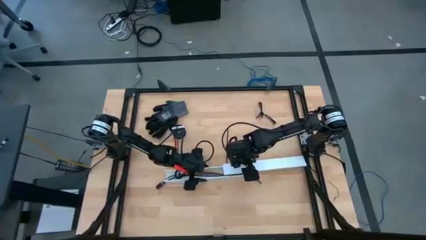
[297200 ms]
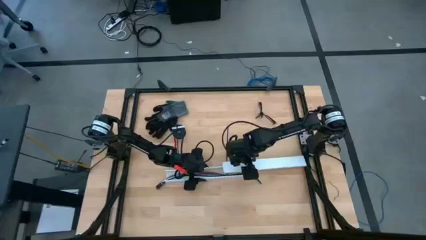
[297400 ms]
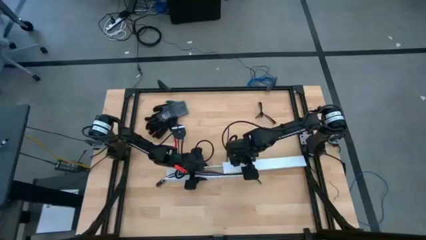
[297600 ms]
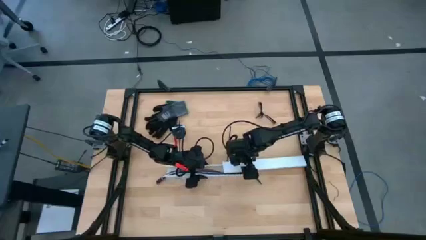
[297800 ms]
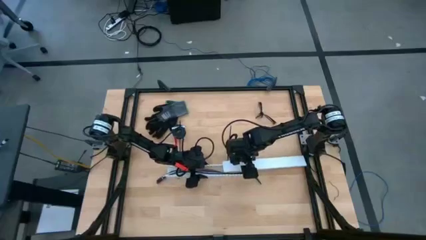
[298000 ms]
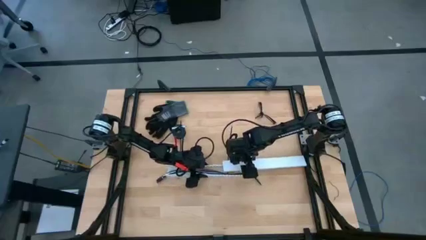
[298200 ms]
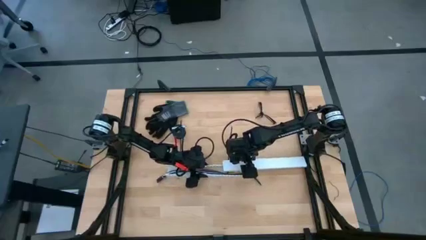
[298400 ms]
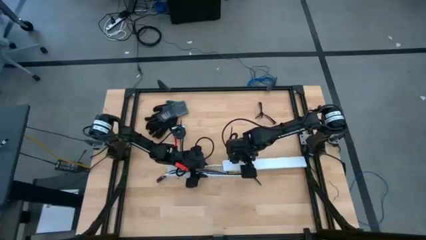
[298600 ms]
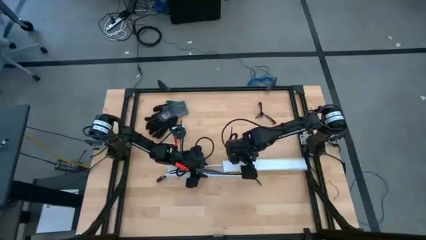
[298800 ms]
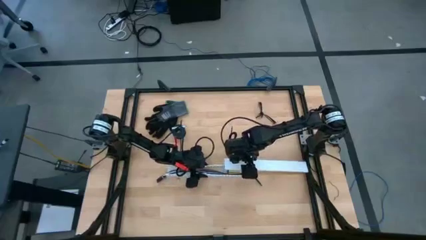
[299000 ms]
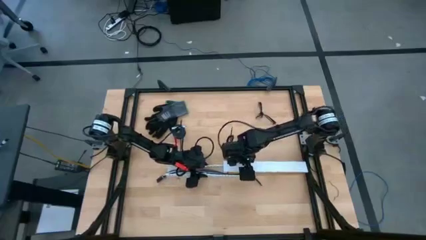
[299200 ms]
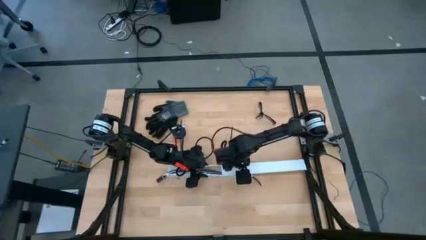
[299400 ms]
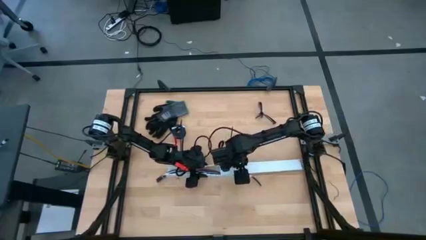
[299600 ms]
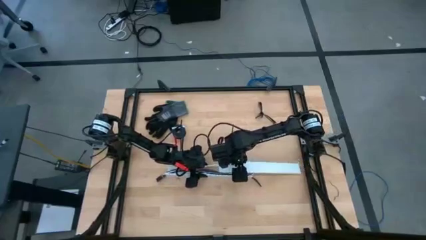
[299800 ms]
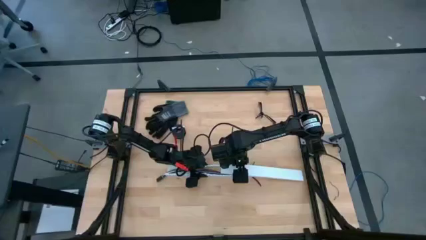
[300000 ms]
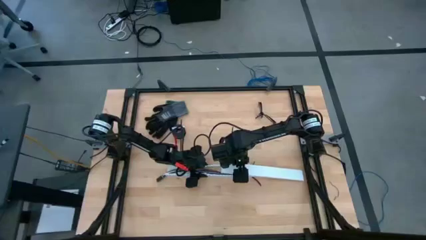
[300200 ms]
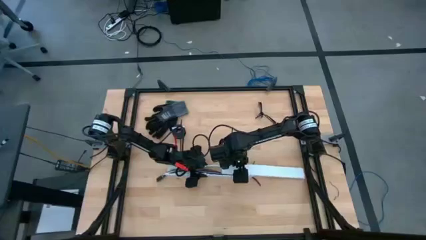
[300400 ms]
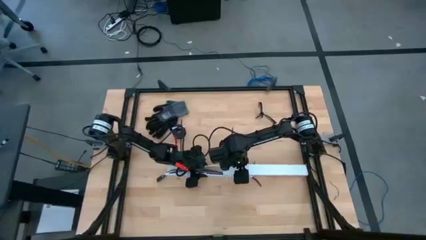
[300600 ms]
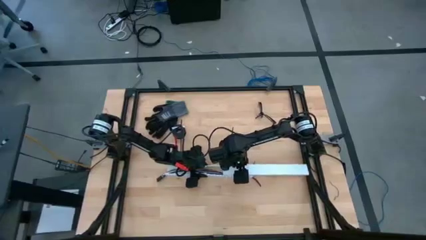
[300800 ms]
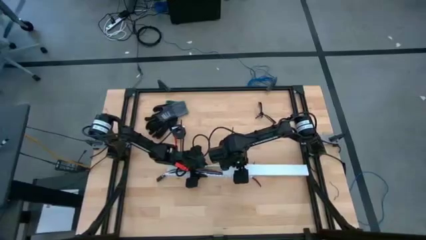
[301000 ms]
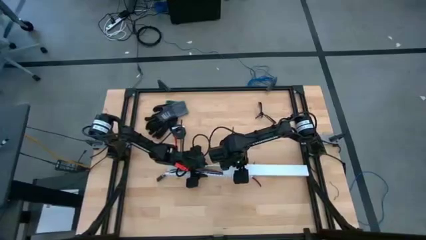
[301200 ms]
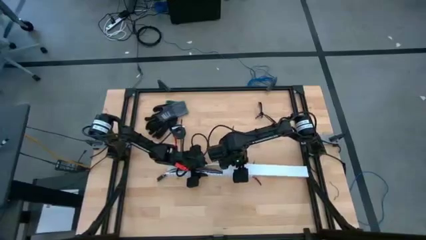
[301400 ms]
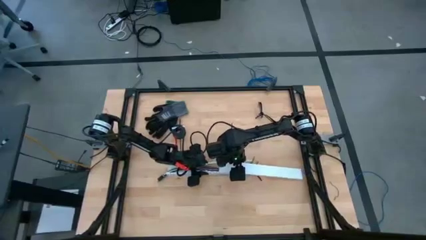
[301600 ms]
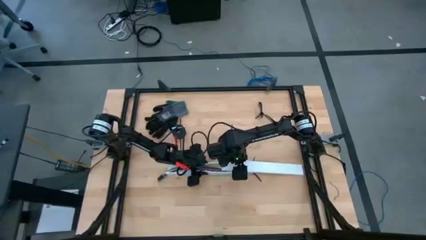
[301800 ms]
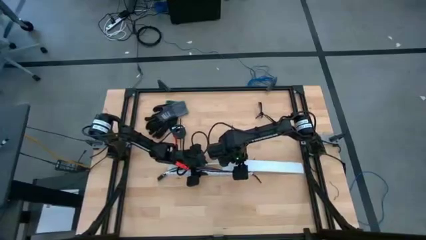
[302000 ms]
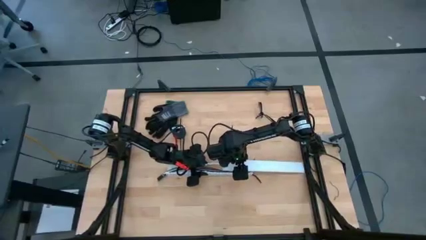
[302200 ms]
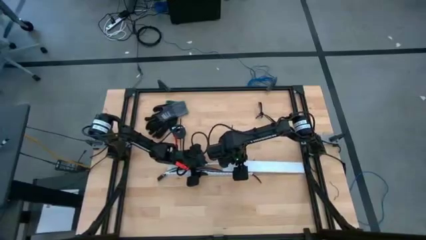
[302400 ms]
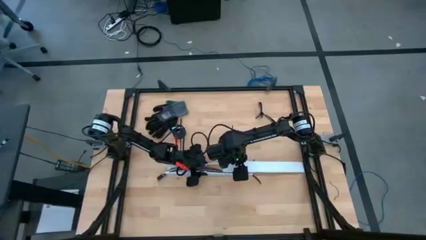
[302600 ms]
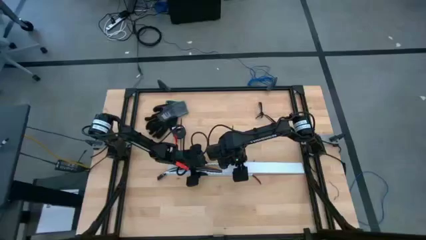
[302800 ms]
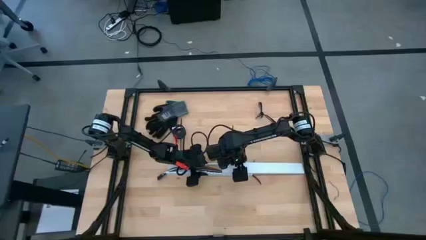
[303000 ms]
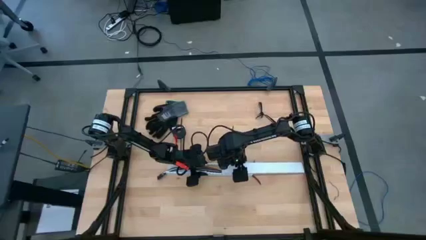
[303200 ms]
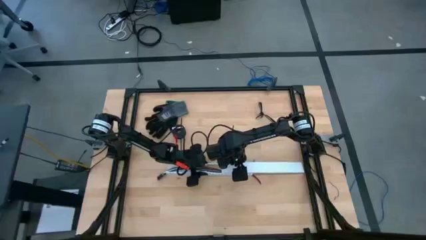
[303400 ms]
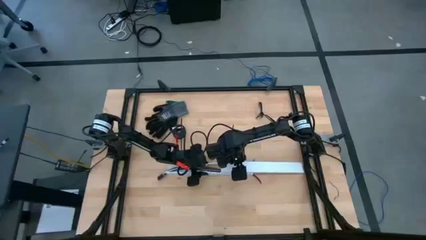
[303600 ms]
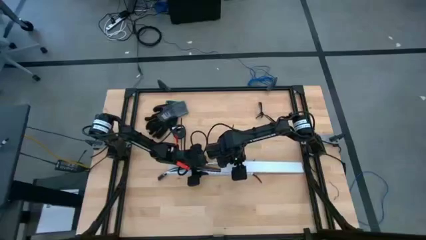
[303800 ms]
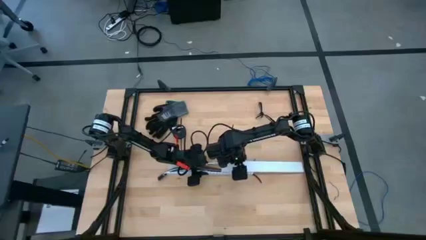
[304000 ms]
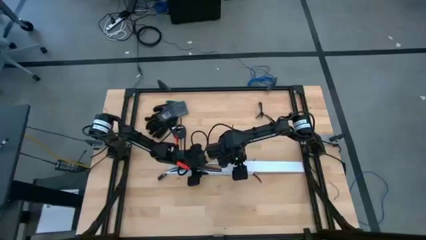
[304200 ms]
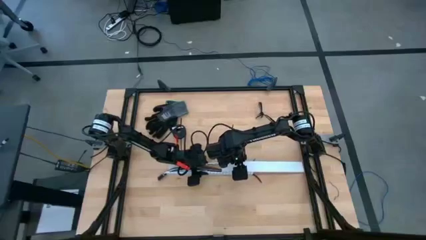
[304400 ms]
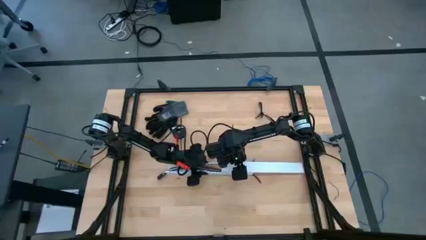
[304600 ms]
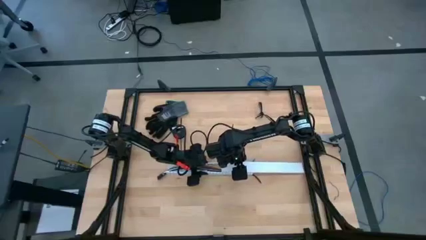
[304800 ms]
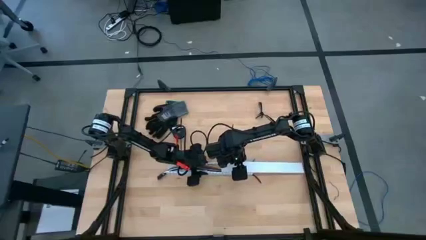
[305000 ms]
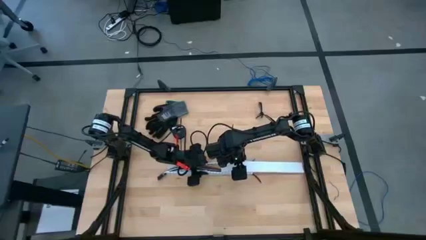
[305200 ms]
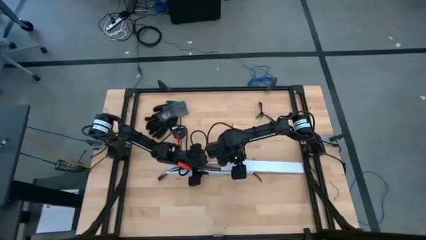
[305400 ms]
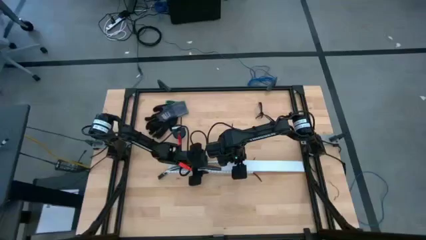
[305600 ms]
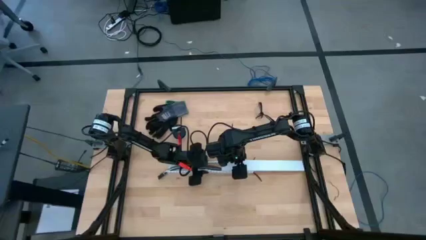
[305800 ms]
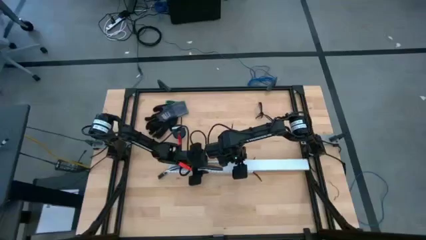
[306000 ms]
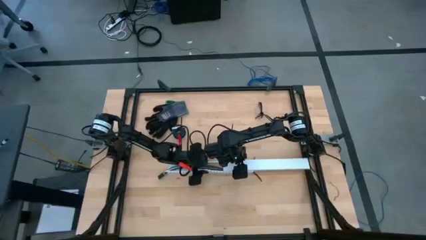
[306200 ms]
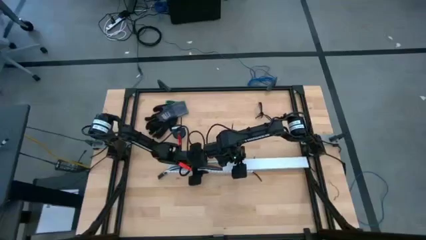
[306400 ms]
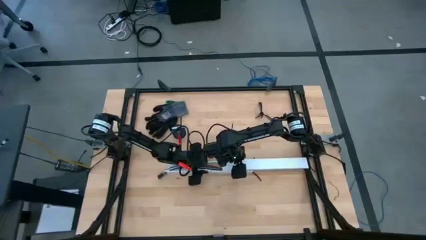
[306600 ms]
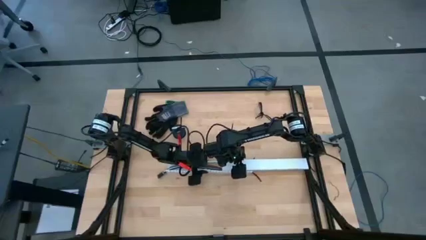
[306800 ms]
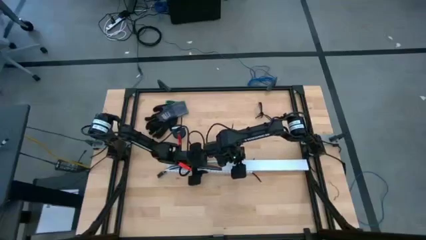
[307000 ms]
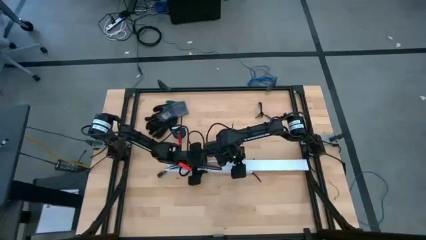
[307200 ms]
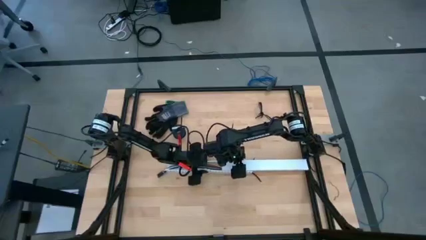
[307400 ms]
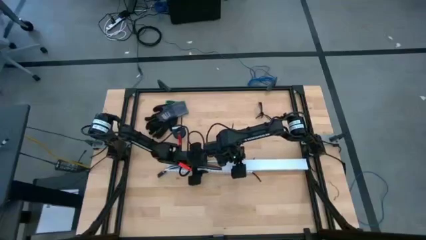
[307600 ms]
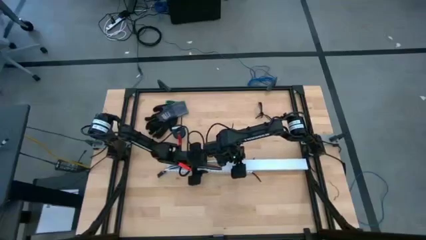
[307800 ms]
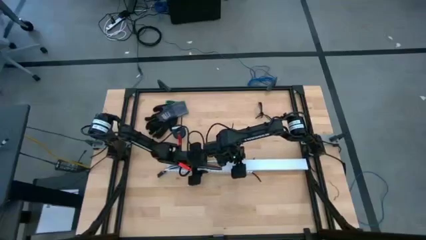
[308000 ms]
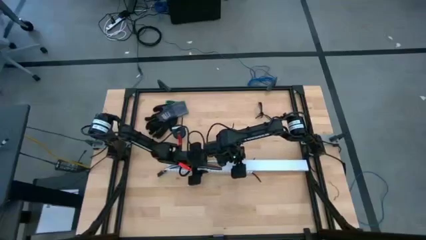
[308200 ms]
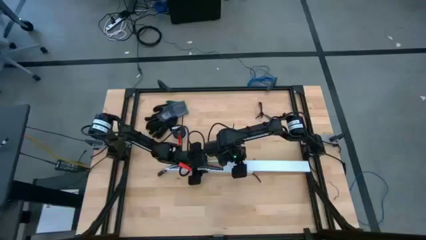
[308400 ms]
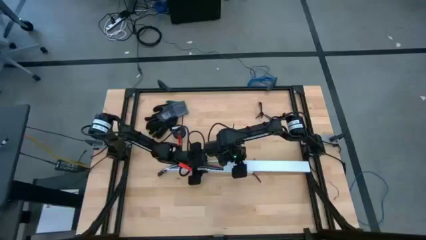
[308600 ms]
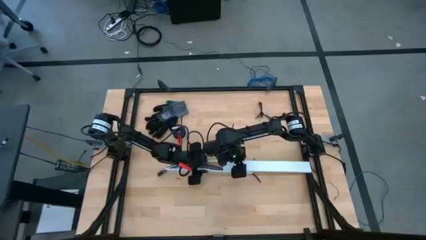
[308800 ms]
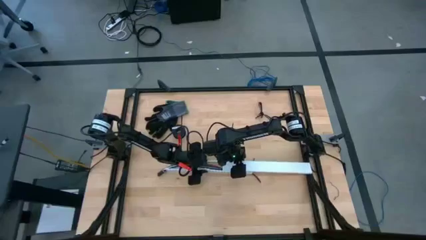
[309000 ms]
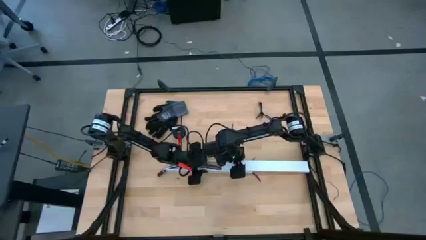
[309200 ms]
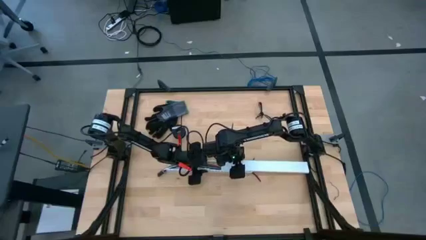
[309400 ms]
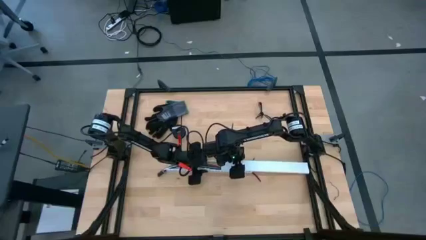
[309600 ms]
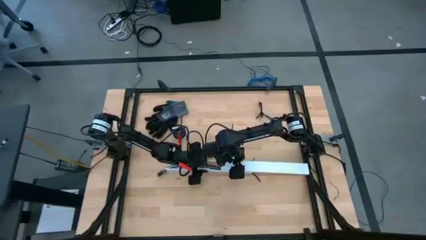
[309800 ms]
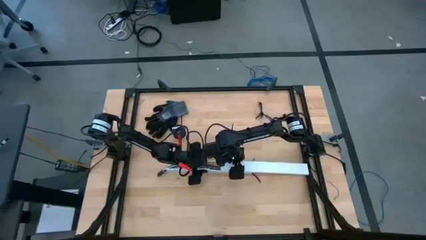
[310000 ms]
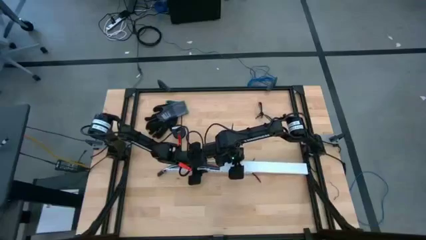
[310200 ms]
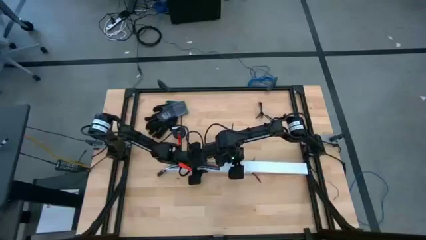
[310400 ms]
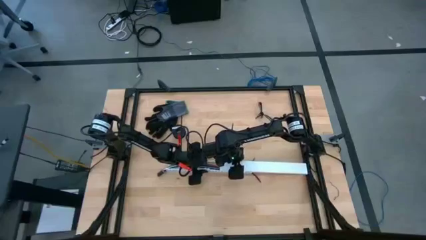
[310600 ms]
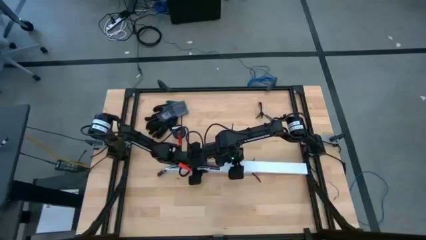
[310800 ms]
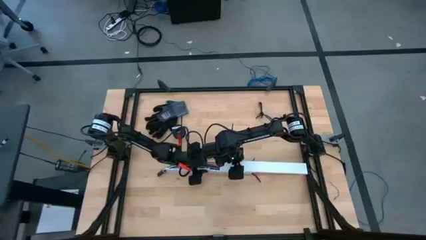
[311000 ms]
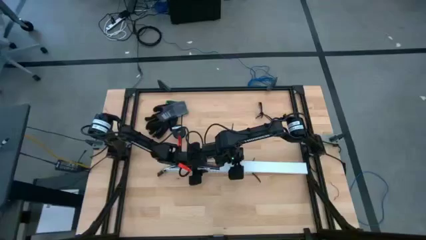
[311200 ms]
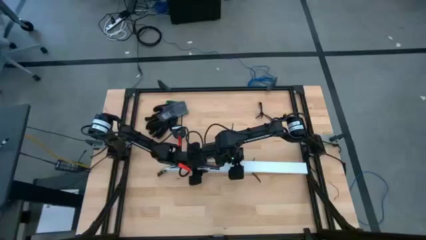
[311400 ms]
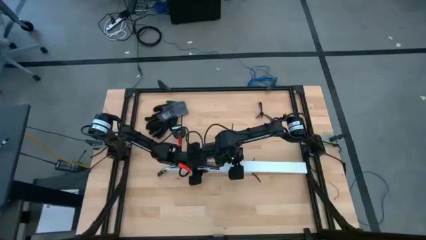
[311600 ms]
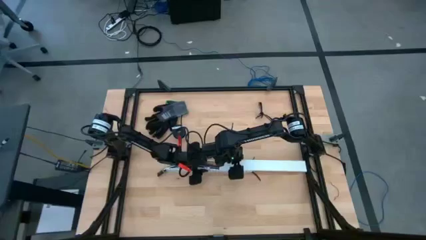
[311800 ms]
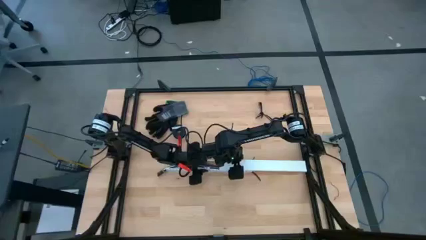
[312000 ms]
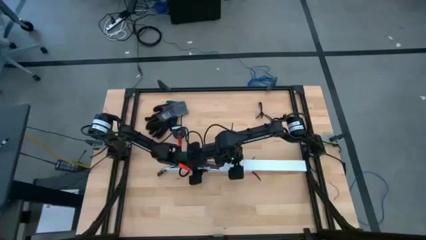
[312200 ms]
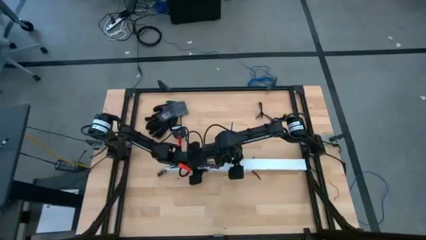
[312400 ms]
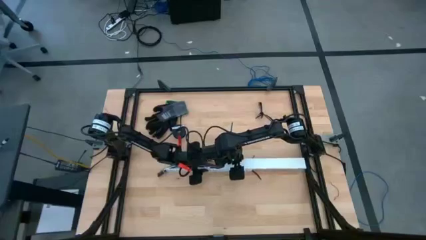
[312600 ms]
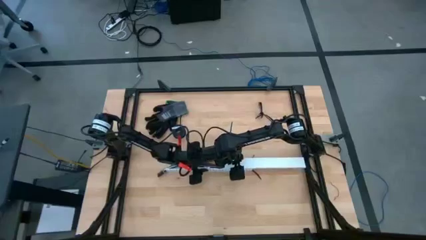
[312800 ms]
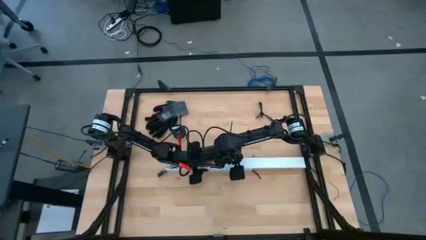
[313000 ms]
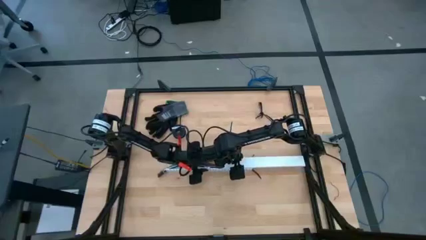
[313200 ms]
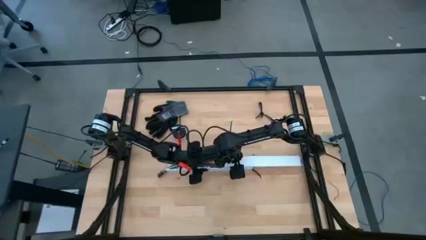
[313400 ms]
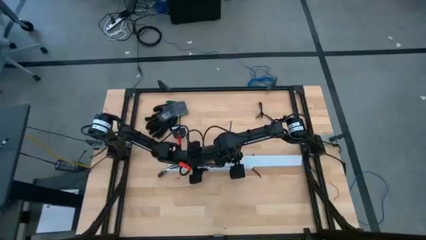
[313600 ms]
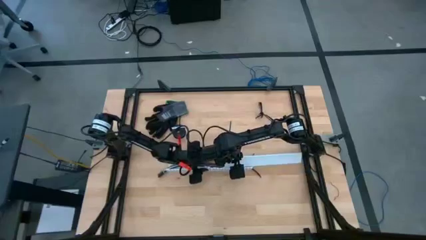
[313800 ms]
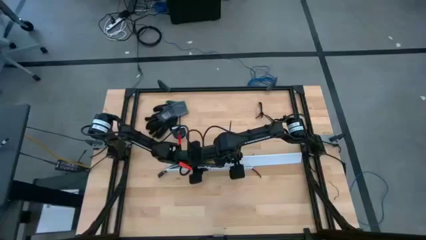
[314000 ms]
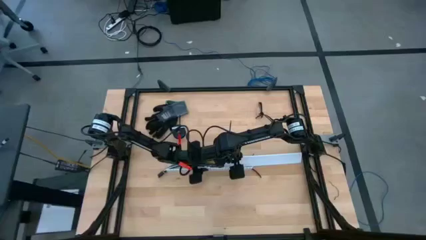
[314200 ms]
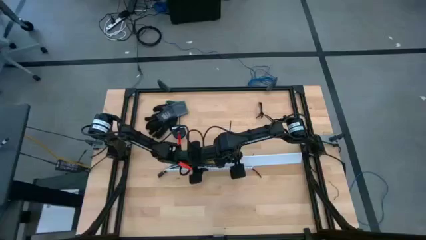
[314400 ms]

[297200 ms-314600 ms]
Task: Ziptie cables
Close the white cable duct cover
